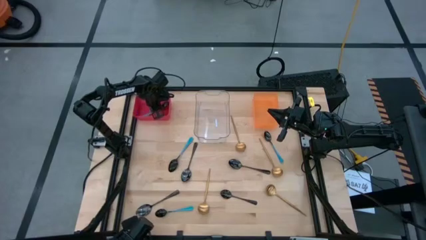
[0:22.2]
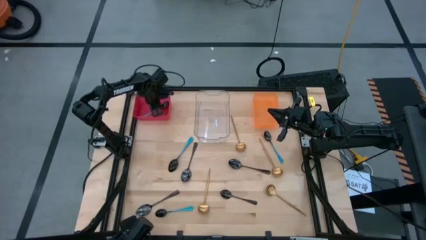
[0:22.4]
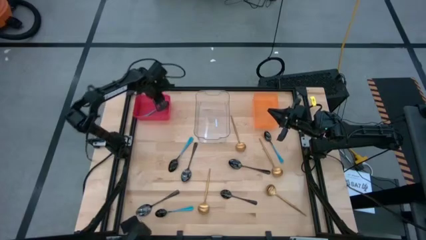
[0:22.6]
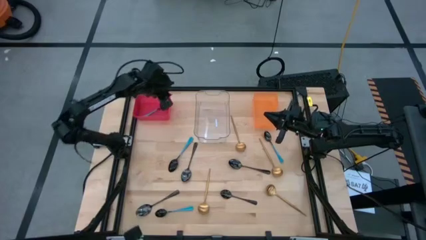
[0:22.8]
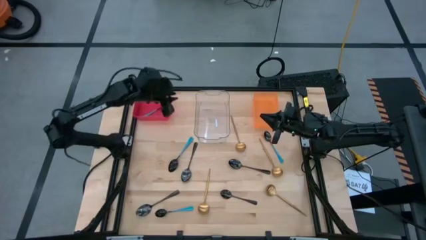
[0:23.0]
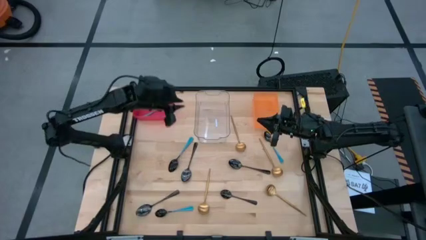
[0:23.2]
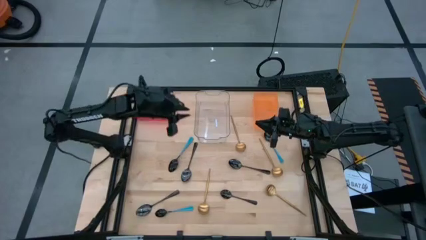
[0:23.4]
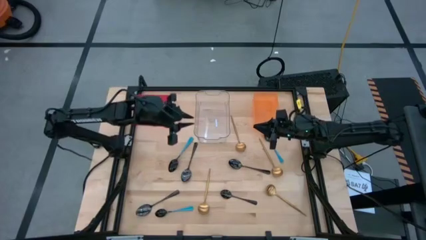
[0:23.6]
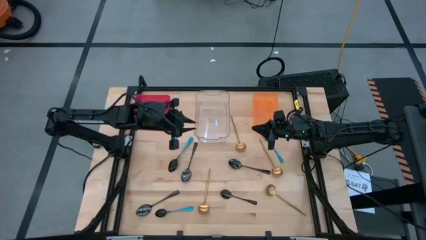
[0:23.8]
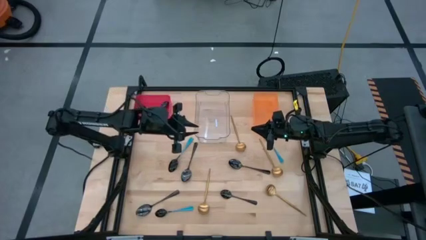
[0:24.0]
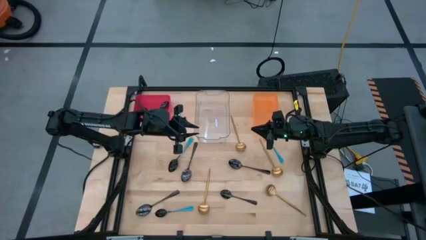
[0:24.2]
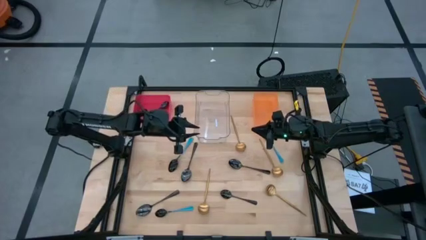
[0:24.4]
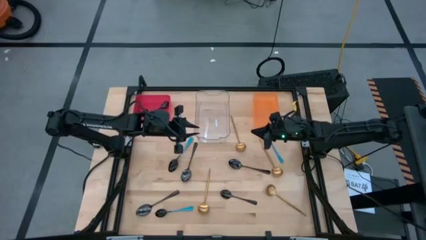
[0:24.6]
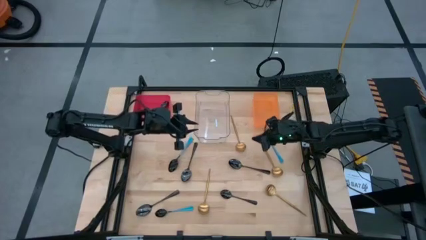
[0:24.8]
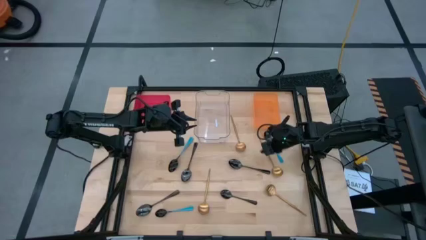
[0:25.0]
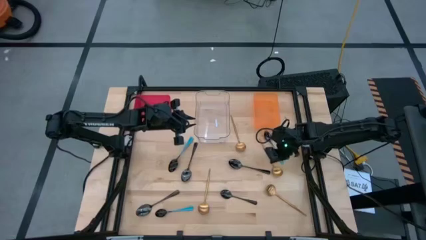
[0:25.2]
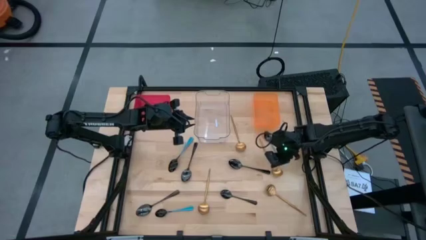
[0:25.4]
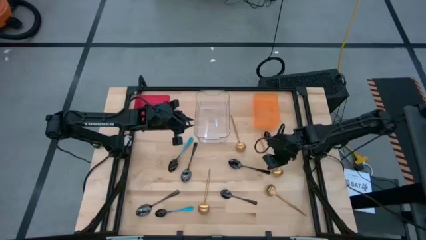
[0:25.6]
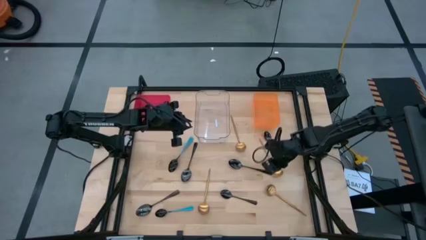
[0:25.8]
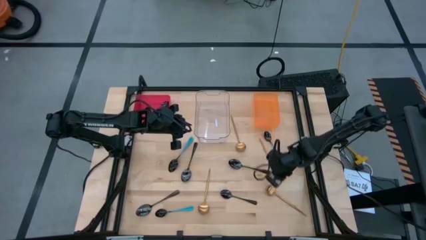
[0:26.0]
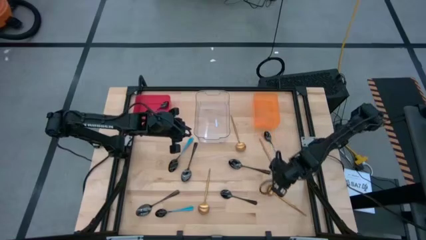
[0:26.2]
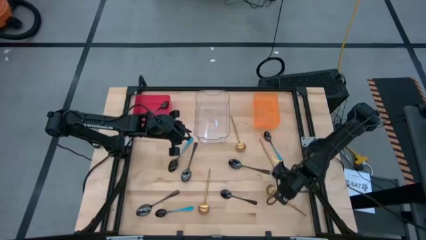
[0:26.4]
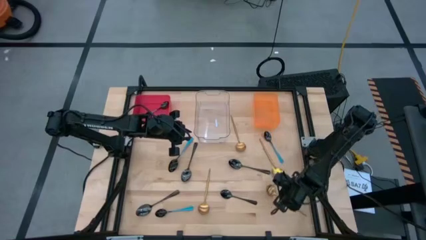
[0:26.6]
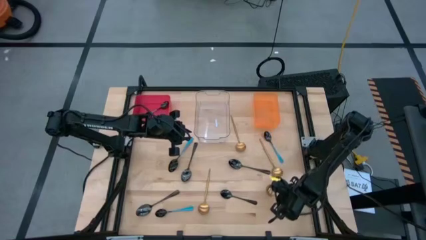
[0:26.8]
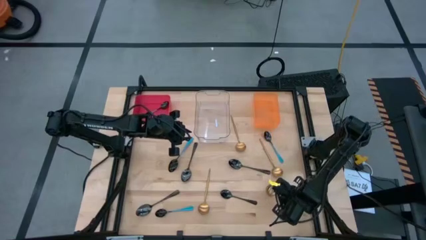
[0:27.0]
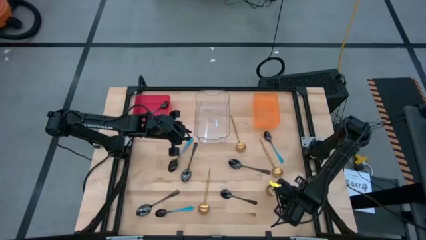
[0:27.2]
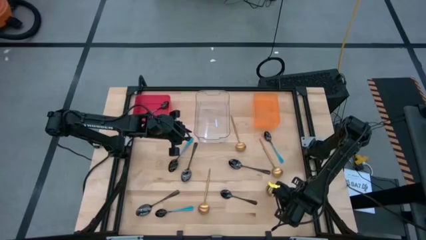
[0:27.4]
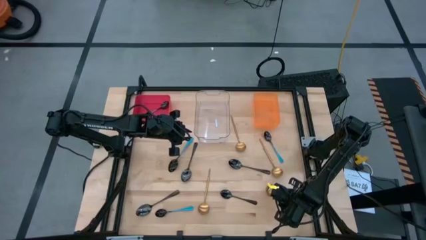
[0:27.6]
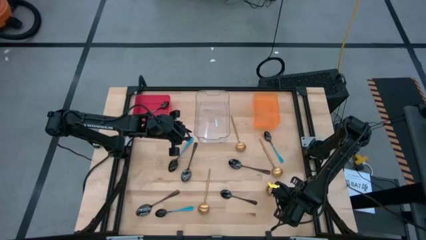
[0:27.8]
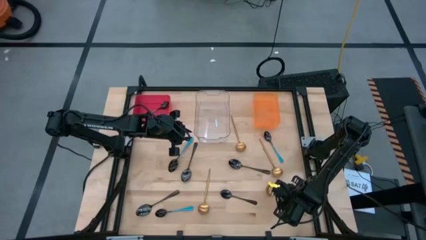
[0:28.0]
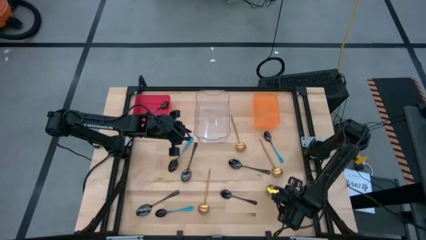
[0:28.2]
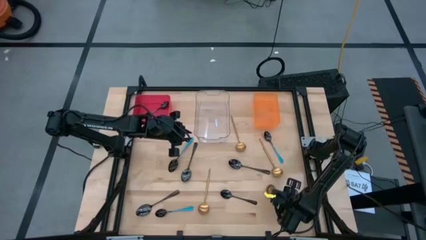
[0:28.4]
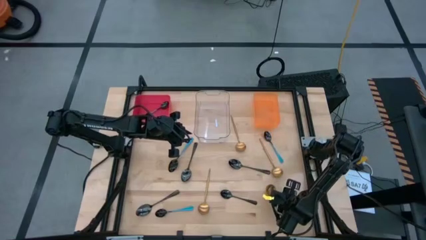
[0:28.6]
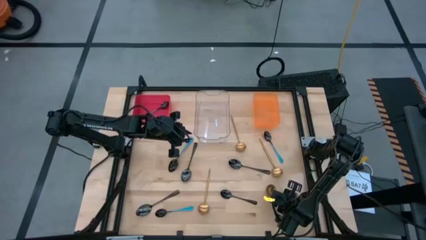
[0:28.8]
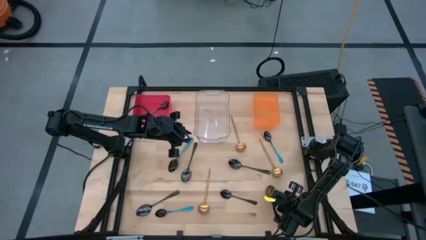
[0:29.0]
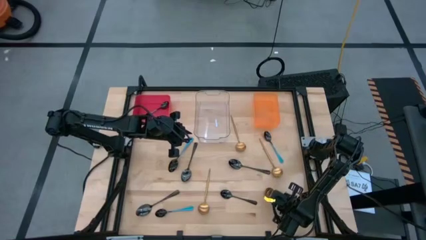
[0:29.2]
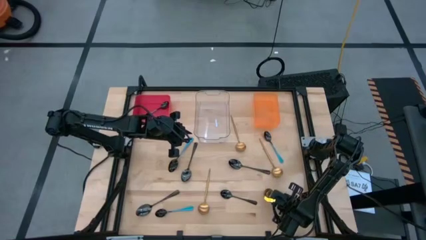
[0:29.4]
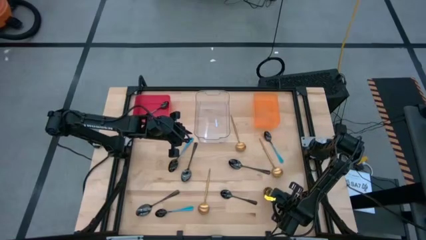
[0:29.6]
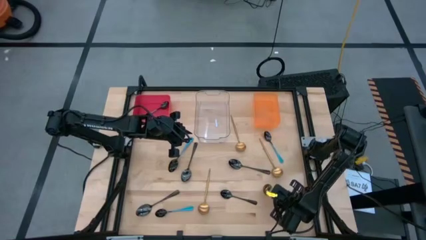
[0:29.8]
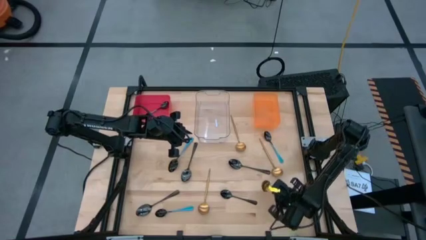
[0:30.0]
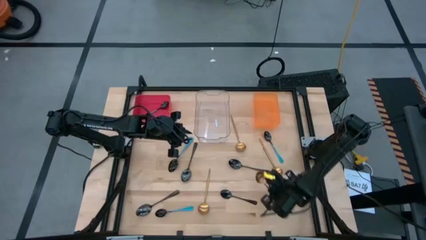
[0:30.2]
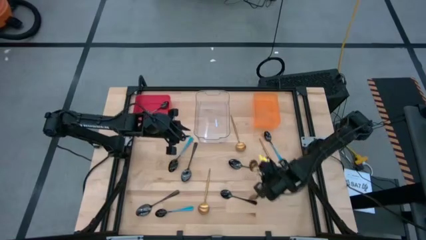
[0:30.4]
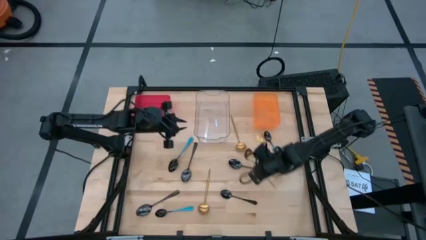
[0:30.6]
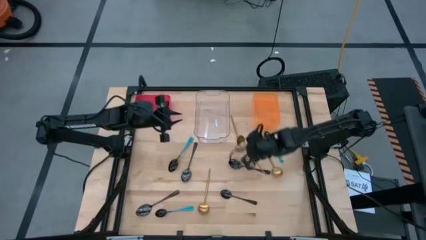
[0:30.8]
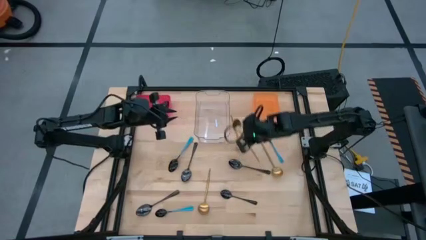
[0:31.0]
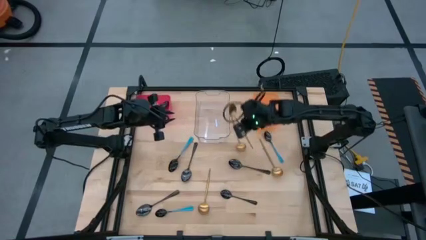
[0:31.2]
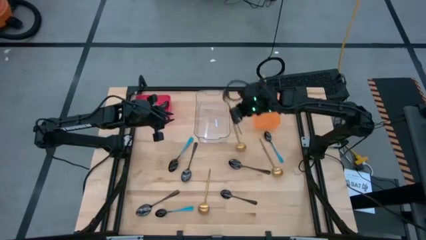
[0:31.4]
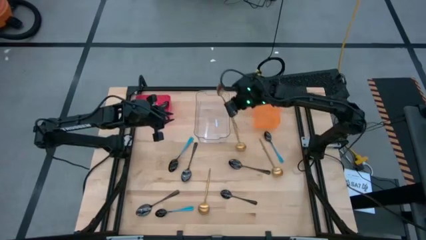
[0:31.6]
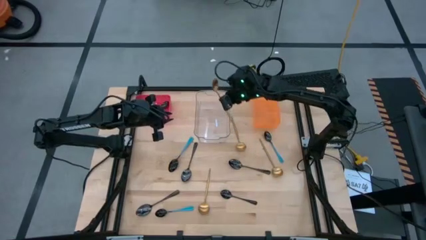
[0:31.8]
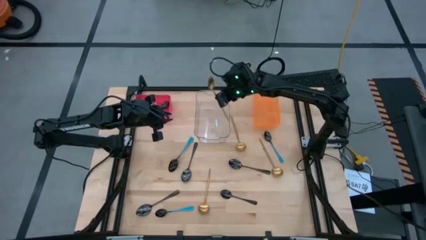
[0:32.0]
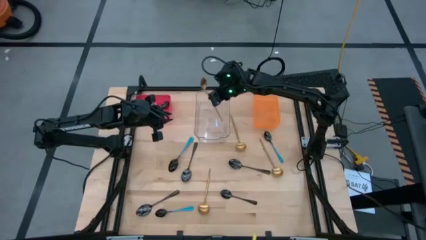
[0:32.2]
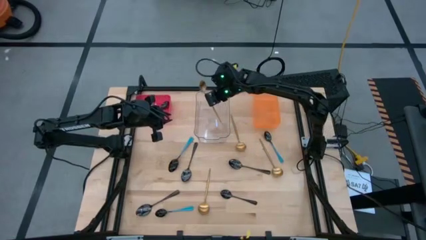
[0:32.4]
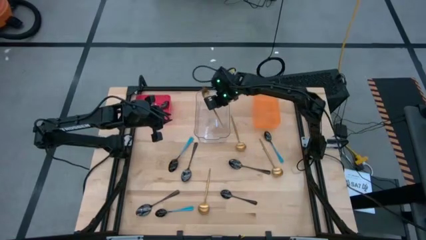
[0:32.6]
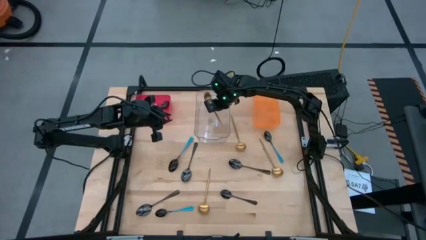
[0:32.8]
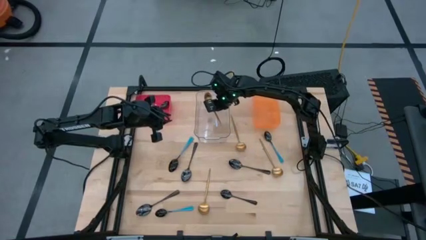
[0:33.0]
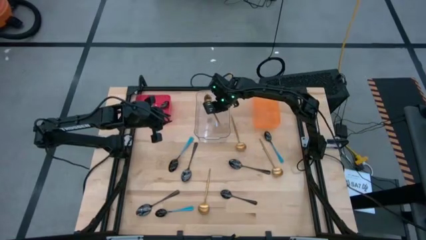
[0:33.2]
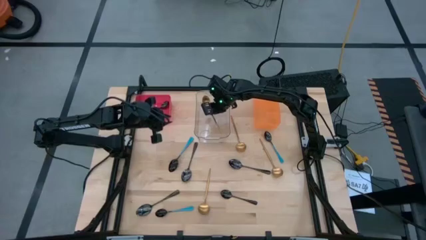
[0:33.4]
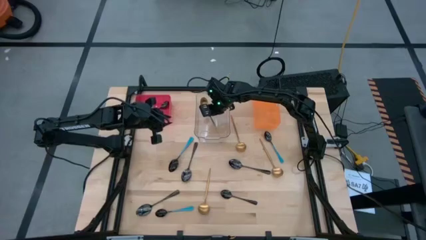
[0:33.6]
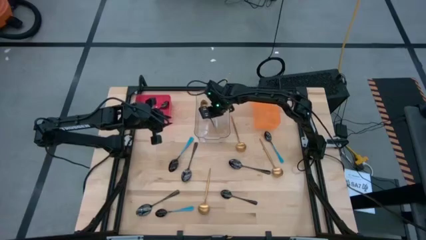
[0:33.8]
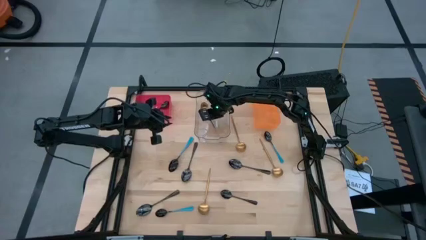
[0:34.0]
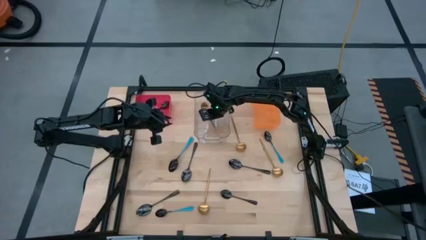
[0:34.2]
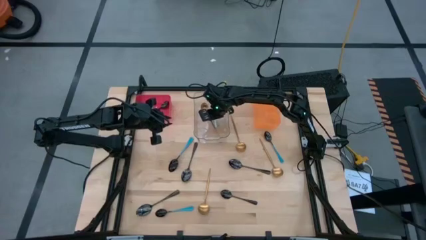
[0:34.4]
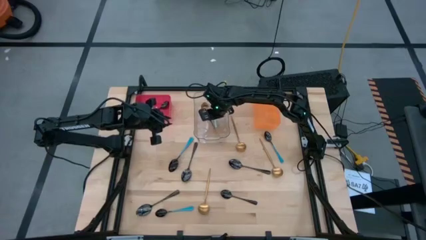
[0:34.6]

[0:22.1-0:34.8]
Task: Sort silverware by color (type)
Put the gold spoon into the transparent bin
